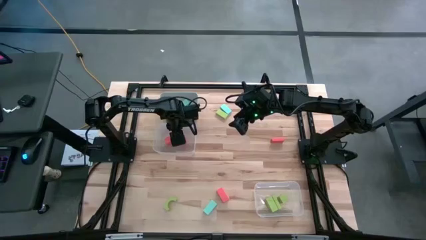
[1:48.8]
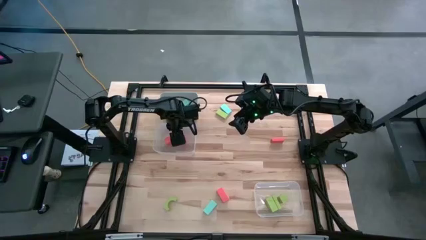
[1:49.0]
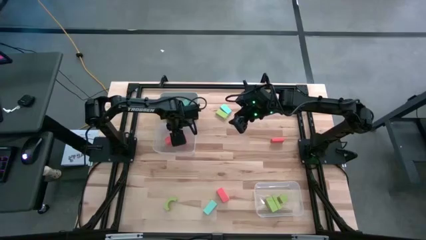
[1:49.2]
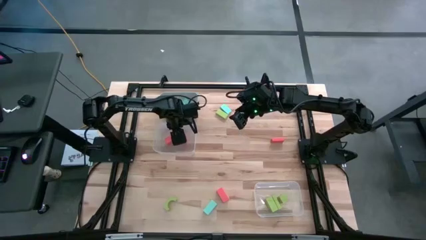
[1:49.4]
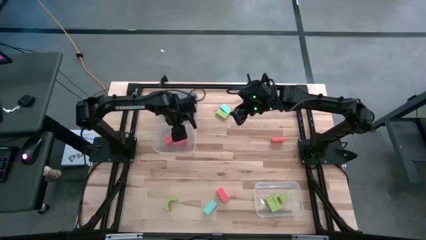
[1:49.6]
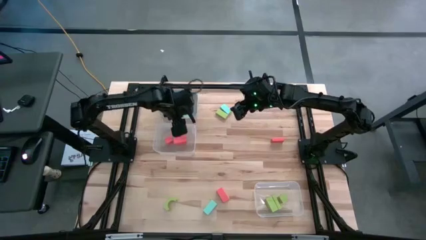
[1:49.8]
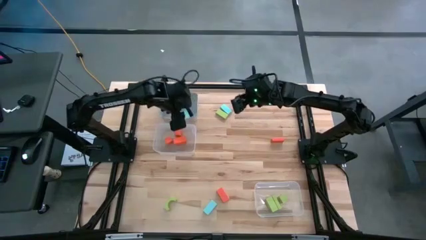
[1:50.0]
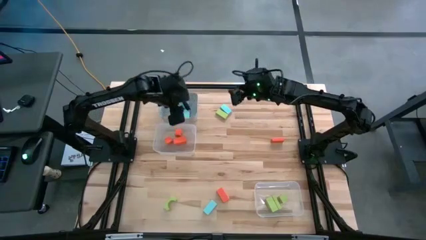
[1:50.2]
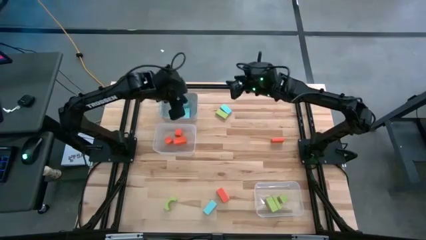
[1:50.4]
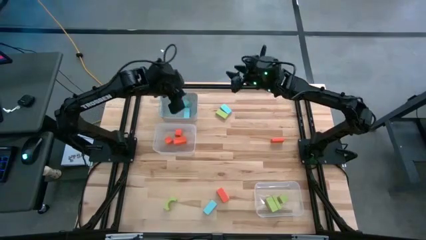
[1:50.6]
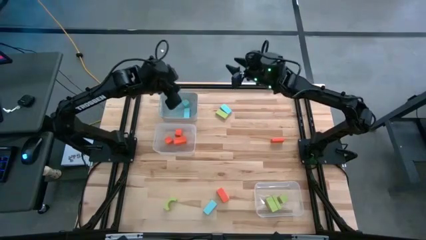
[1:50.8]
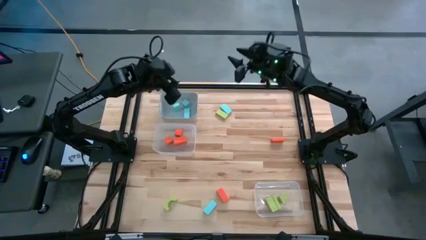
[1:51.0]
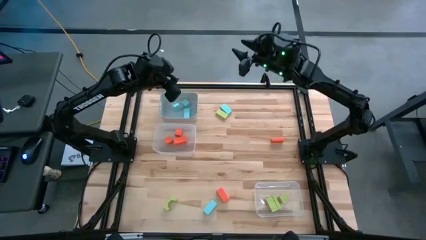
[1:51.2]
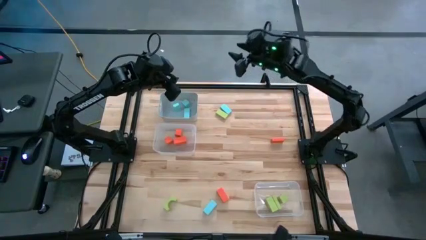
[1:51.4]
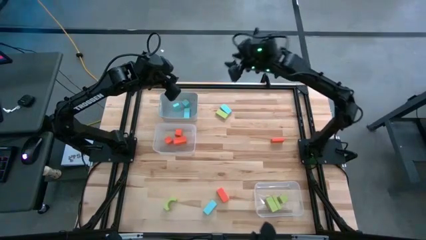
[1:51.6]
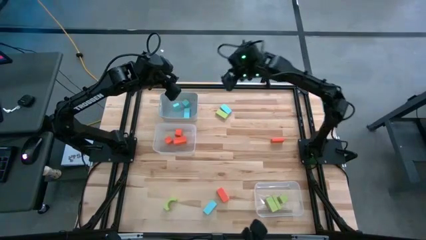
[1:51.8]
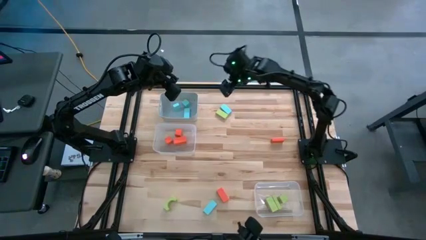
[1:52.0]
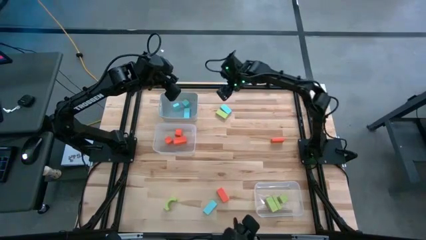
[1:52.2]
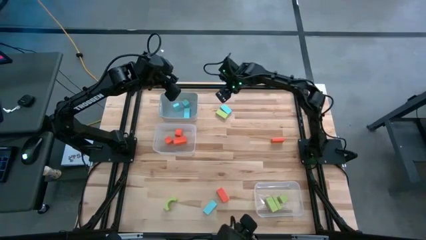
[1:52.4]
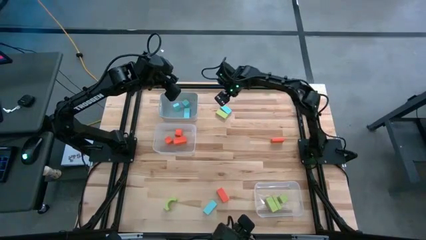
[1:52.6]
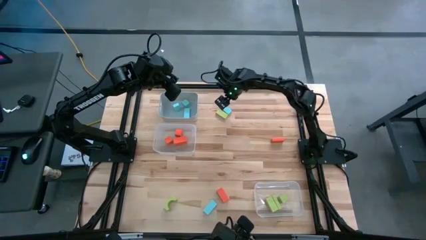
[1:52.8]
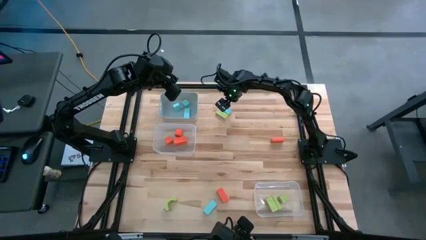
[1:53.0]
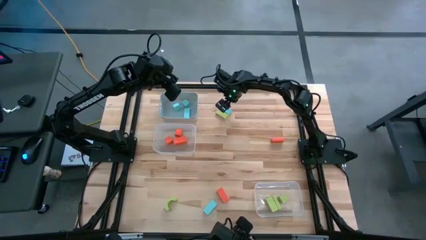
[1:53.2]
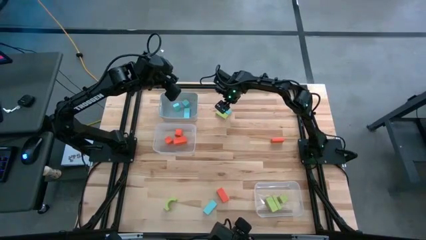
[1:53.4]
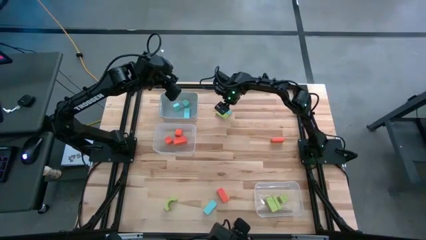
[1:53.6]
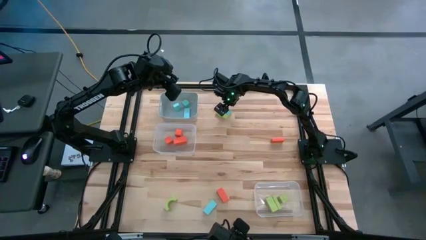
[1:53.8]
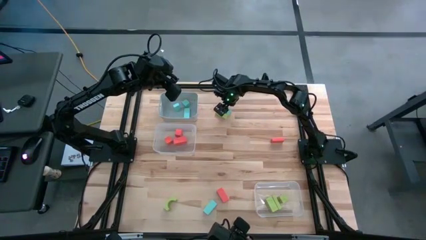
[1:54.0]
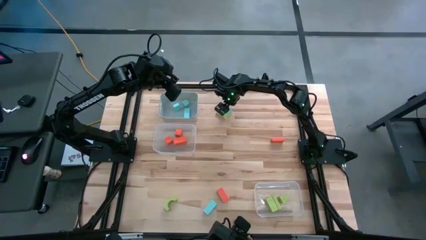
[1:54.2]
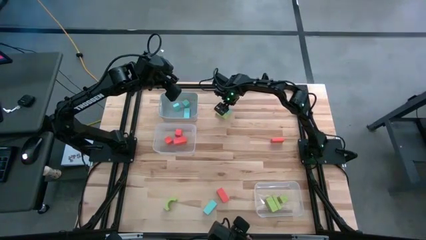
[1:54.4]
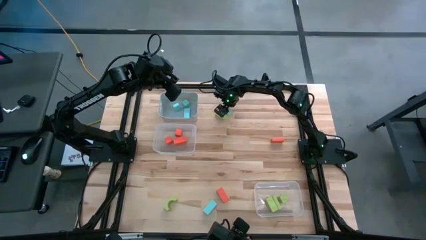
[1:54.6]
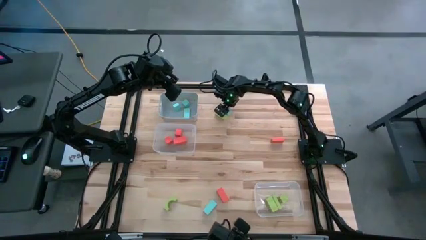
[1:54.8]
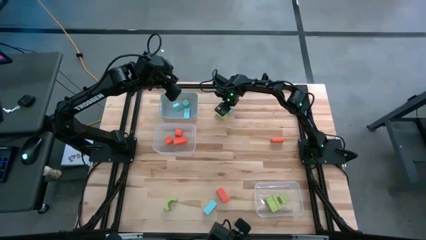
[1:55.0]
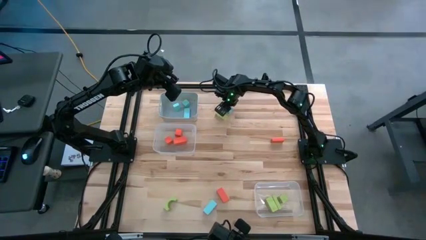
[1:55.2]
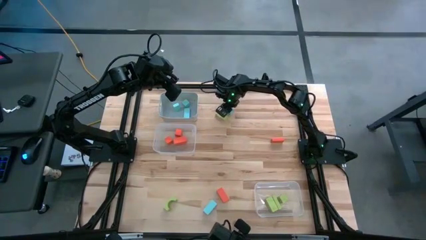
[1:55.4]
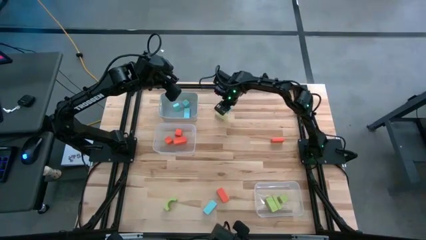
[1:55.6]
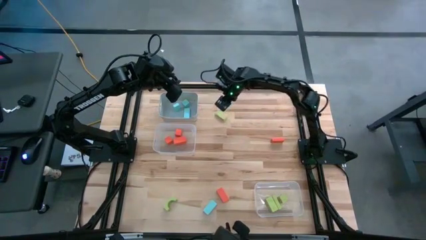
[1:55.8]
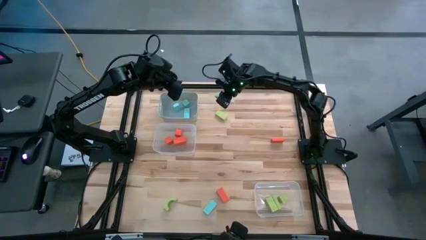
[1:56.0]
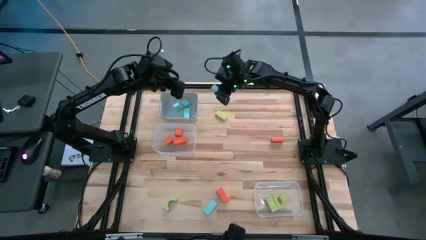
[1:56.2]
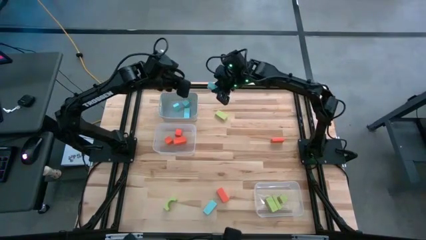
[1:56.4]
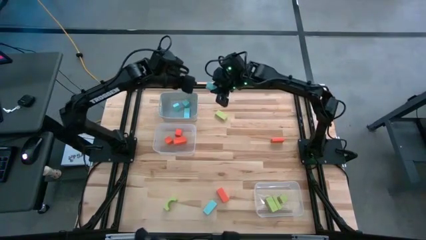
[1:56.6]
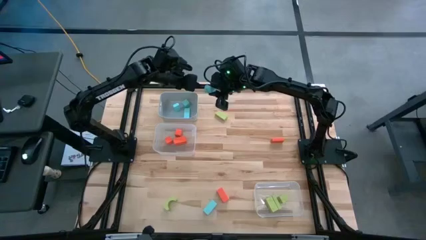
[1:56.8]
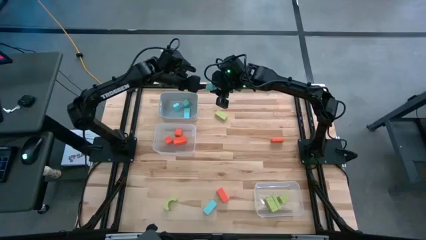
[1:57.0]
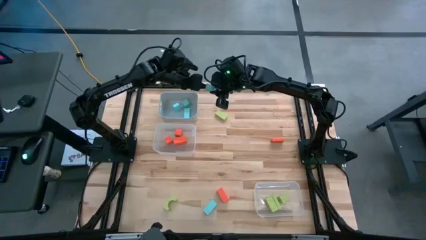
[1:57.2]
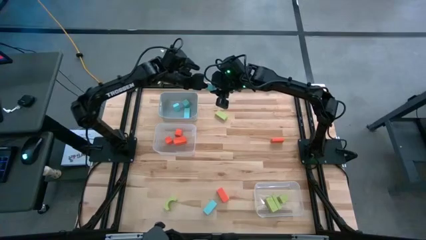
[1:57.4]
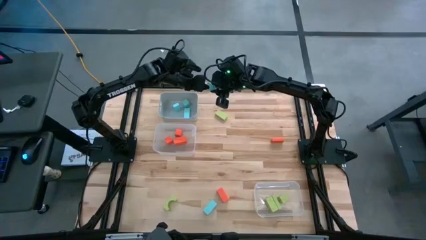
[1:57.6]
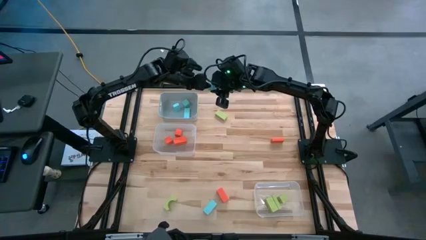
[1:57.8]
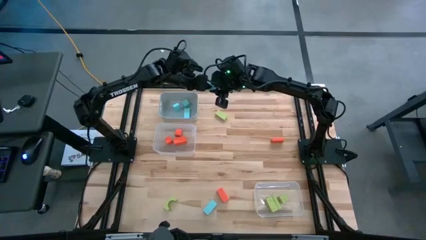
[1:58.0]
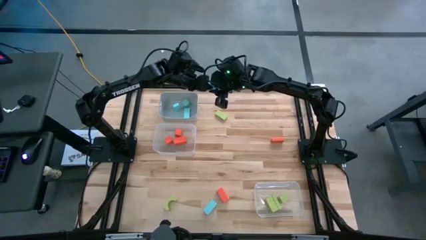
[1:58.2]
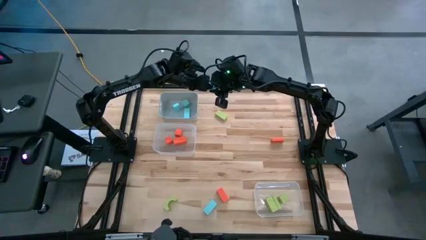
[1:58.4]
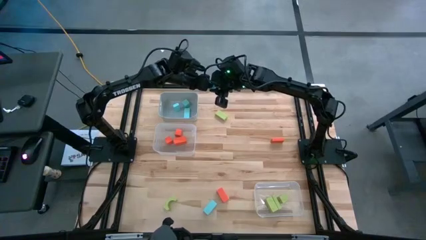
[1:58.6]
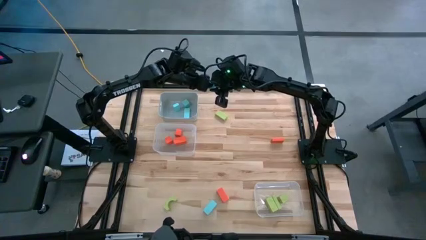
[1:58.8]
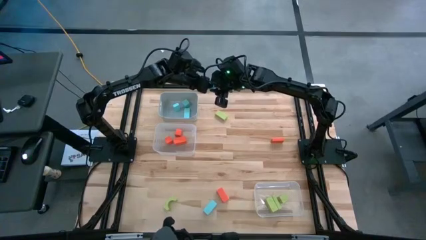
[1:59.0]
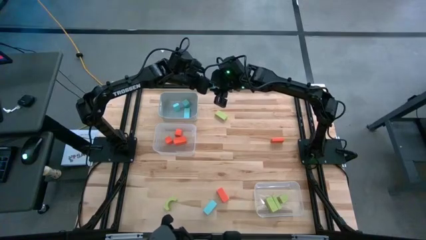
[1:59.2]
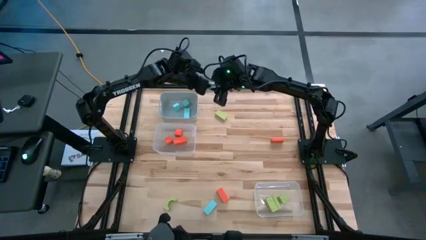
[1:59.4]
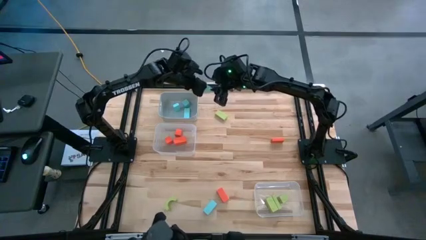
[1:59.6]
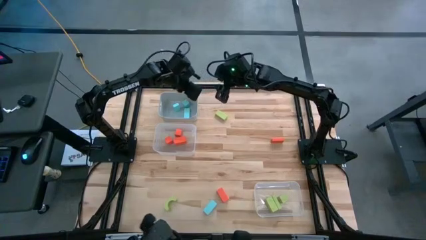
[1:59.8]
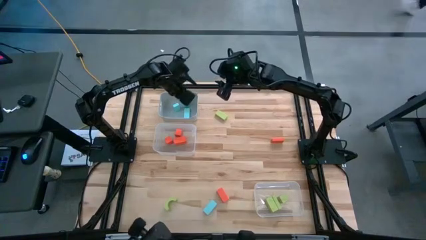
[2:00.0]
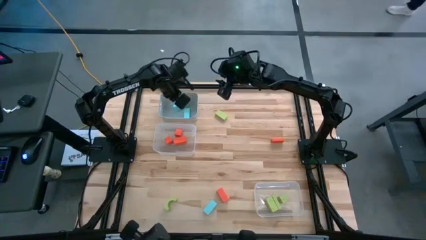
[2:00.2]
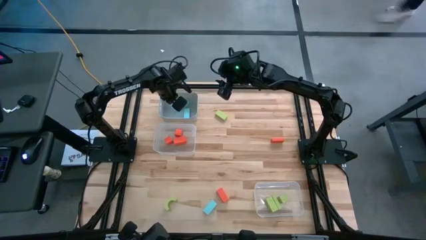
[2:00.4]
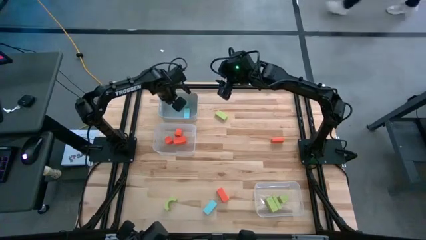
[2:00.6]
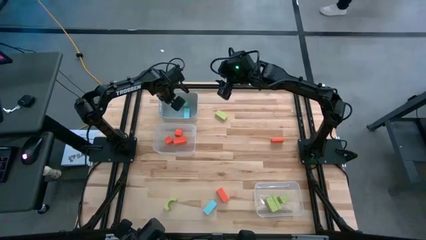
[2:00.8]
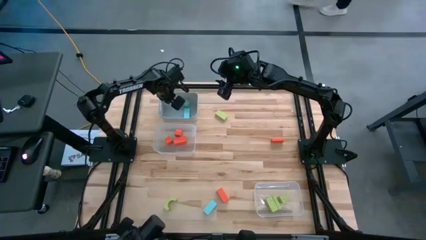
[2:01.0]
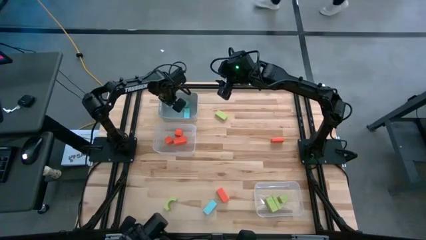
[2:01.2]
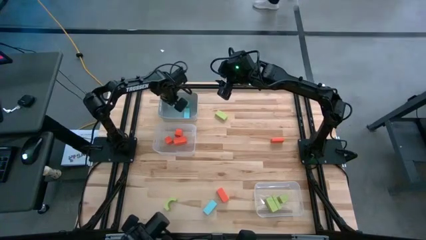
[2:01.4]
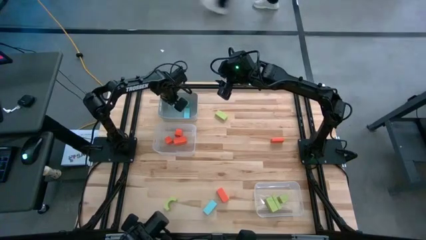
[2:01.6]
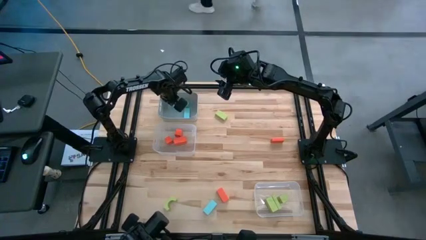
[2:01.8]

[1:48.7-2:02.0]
Task: Sort & place blocks by color
Put the blue block into the gray bin

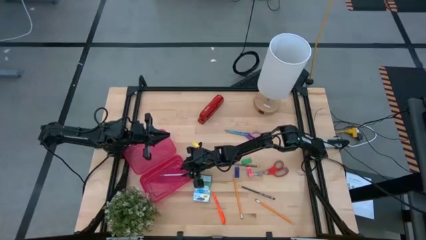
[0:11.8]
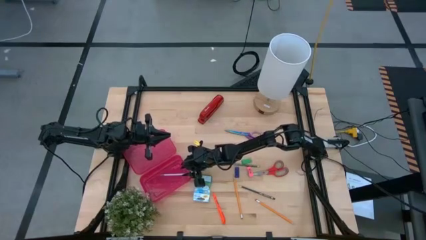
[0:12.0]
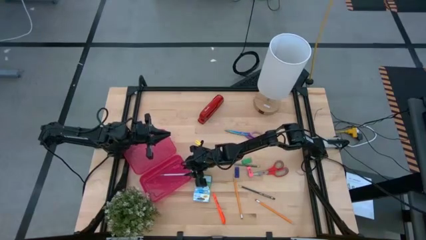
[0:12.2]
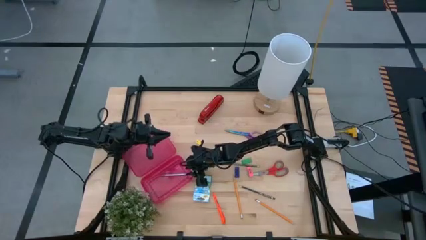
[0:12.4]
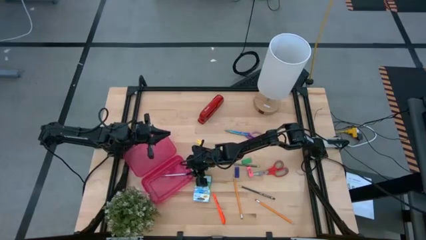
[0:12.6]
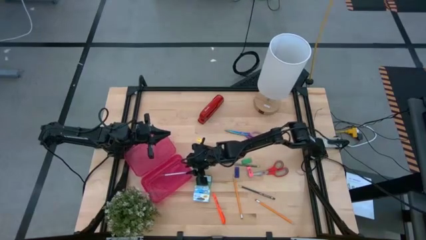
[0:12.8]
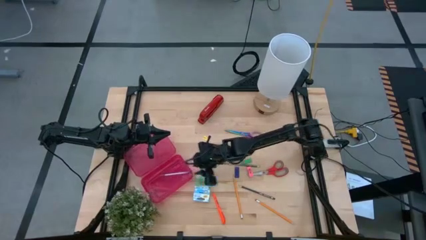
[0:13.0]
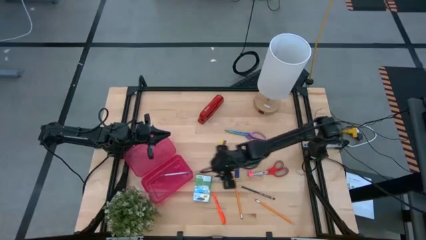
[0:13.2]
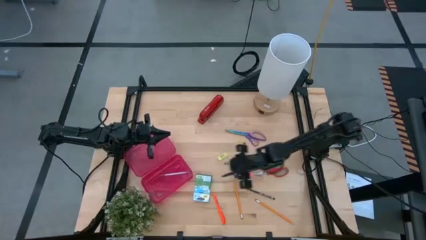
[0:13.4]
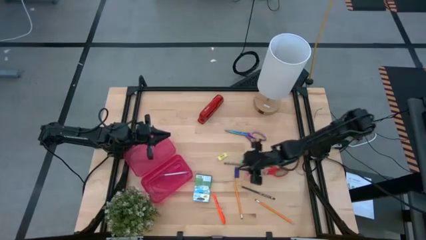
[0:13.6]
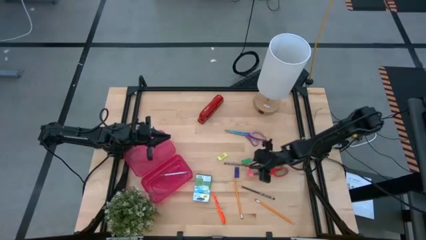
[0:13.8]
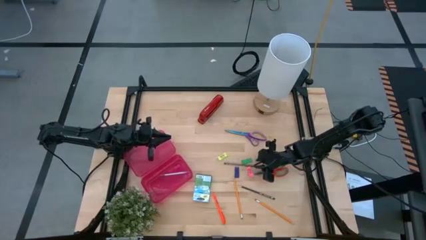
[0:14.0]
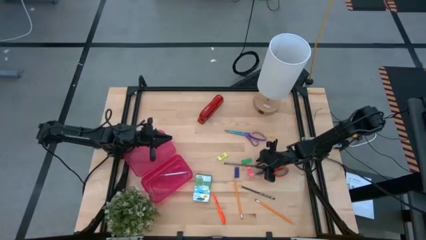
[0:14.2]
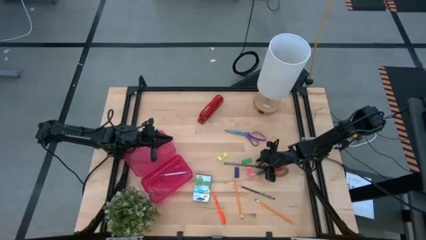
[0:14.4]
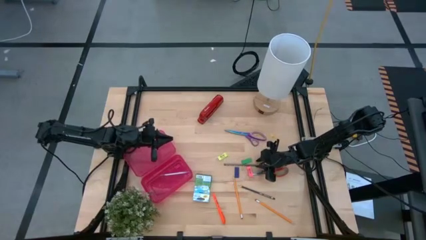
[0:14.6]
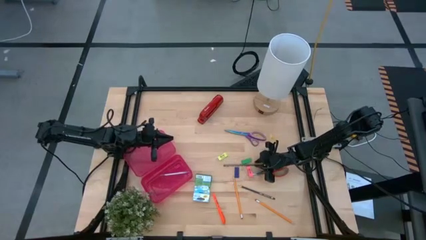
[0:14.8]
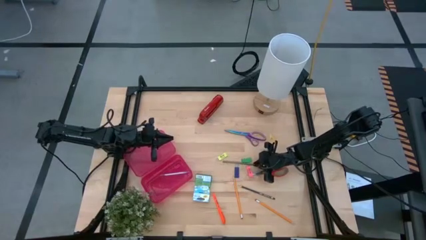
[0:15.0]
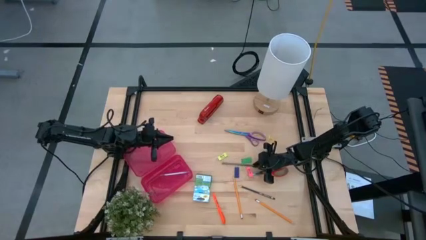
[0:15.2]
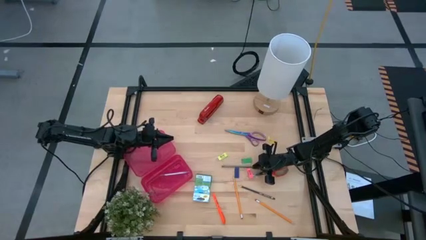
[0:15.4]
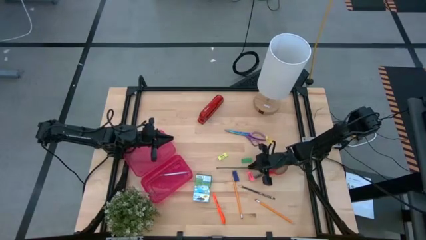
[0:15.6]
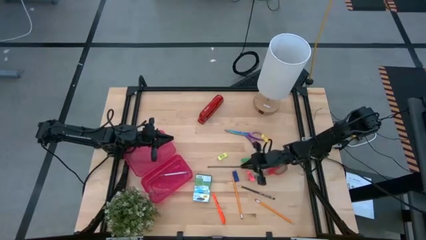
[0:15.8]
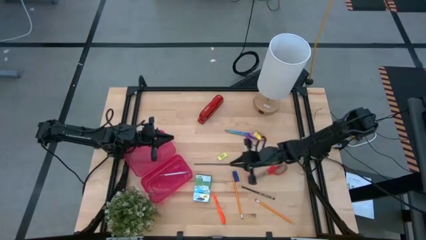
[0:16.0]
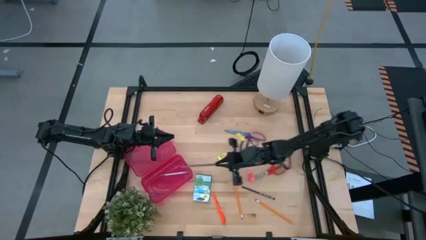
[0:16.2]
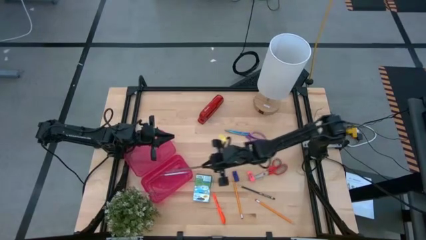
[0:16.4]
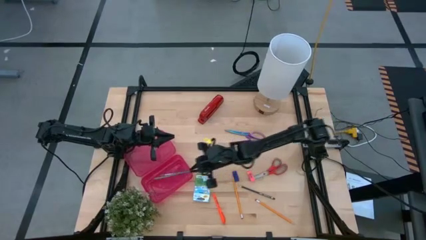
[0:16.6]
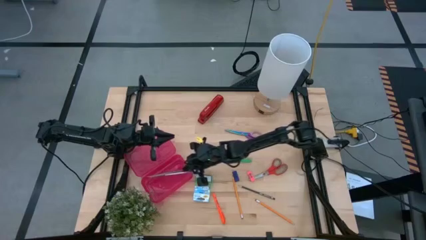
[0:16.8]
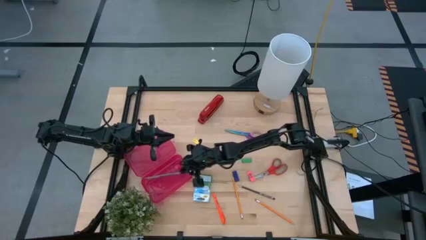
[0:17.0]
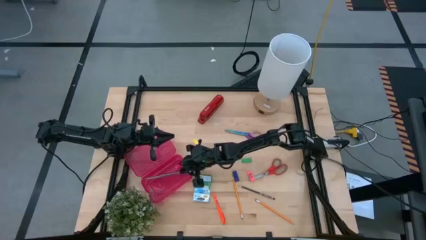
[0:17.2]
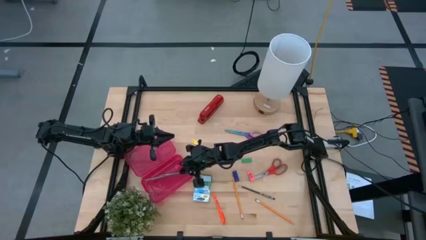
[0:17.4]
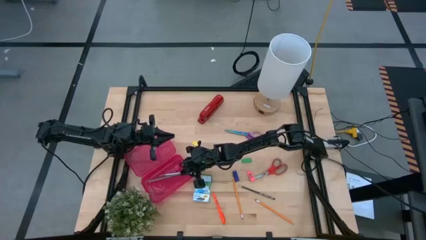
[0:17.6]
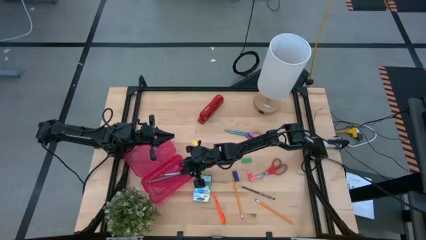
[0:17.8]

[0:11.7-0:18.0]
Task: Pack school essentials
Put the dark blue pencil into the red supply box
